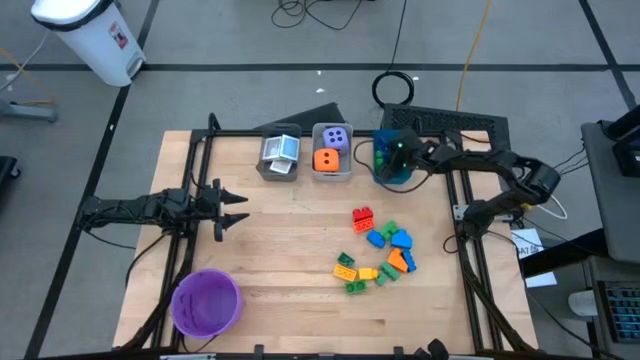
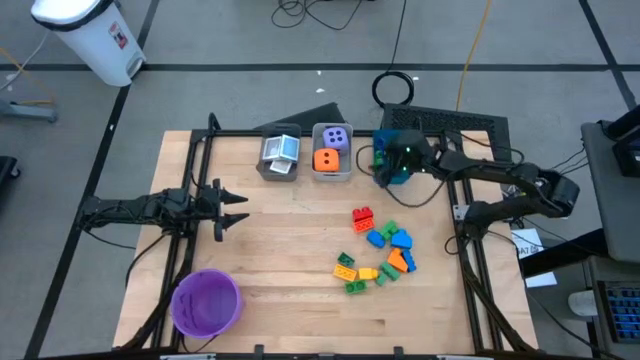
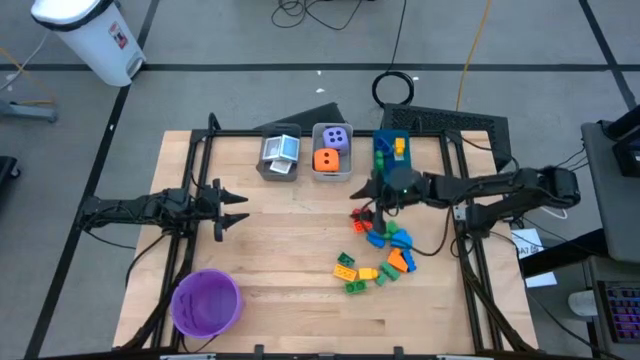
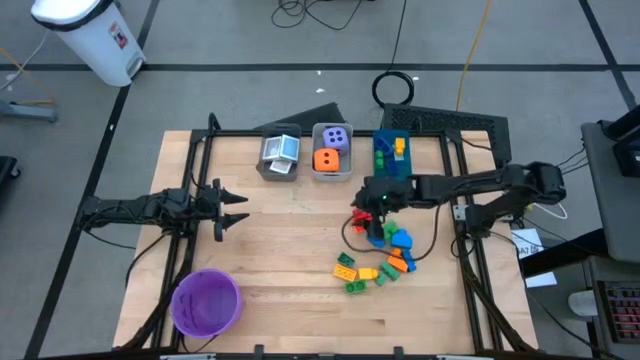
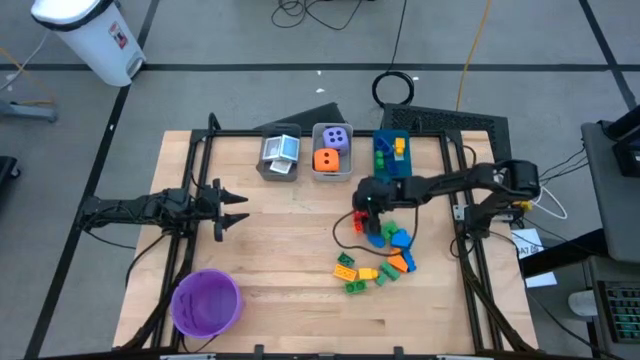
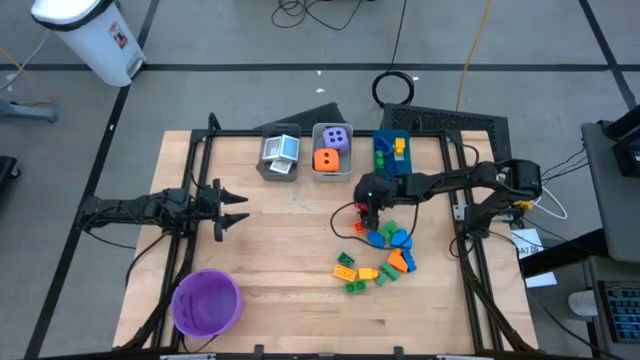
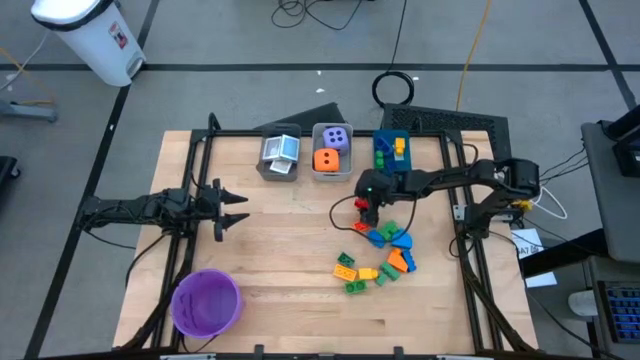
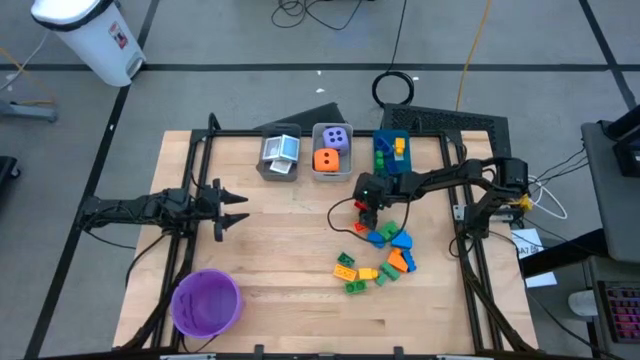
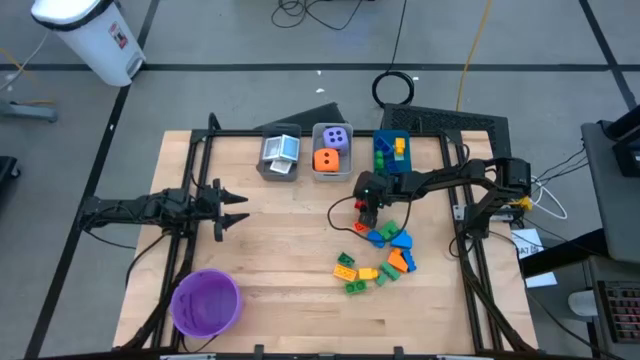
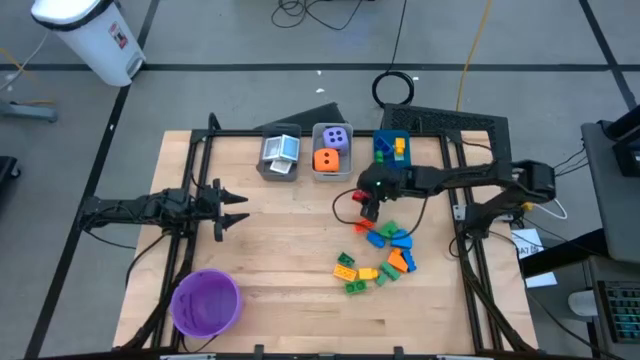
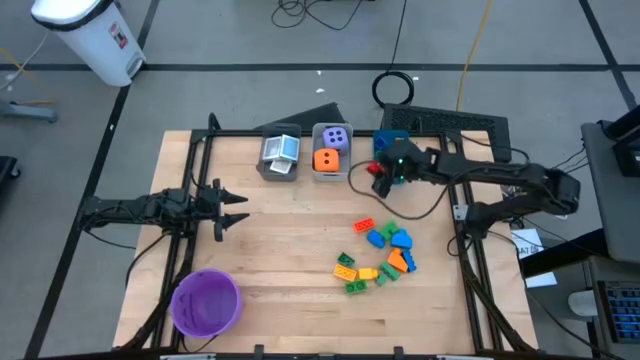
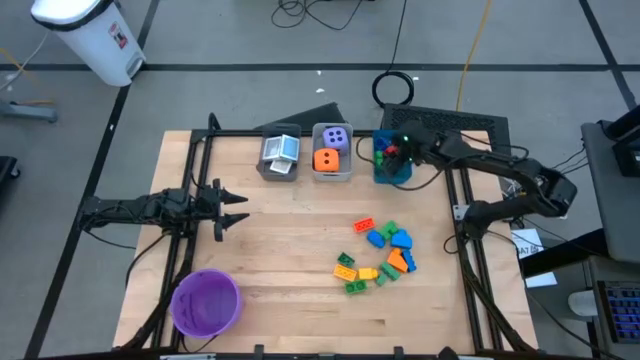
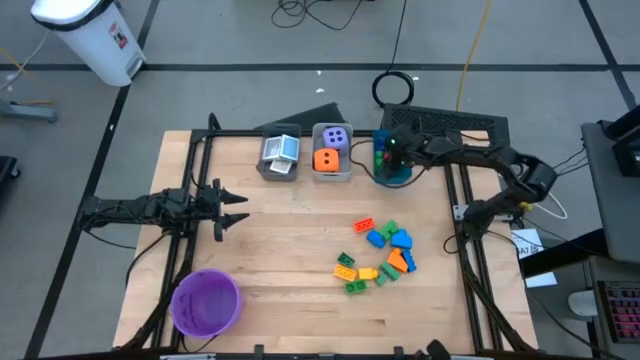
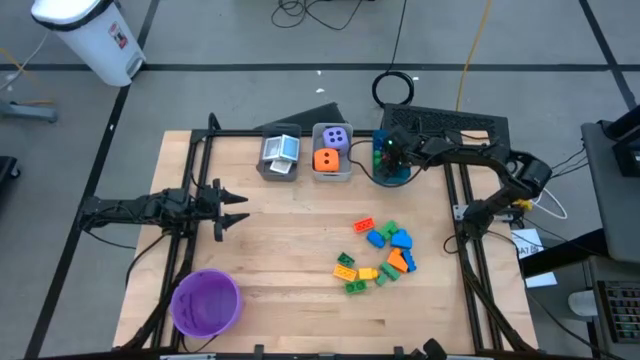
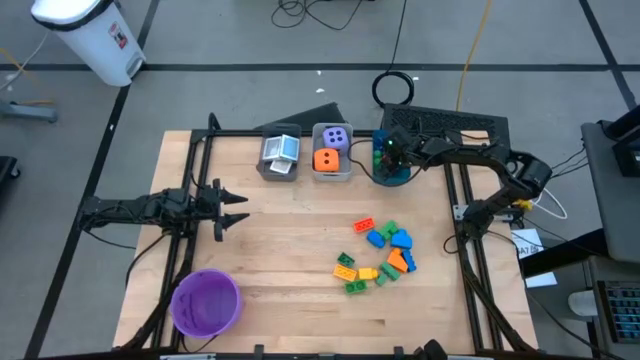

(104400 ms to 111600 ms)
Task: Pick & Place Toys
Put the red game piece into the blue bin

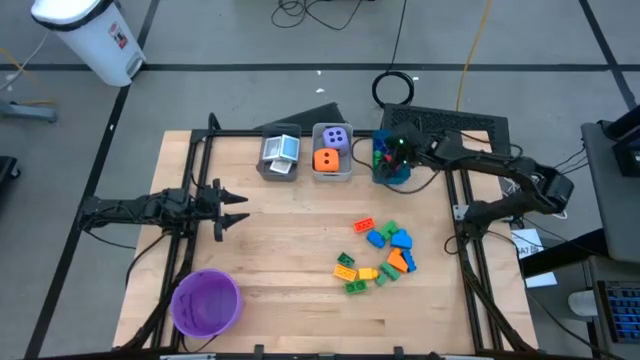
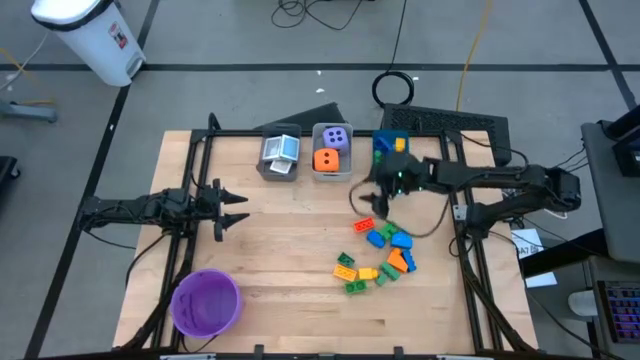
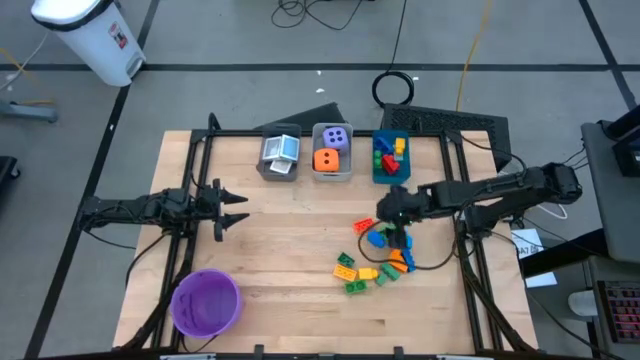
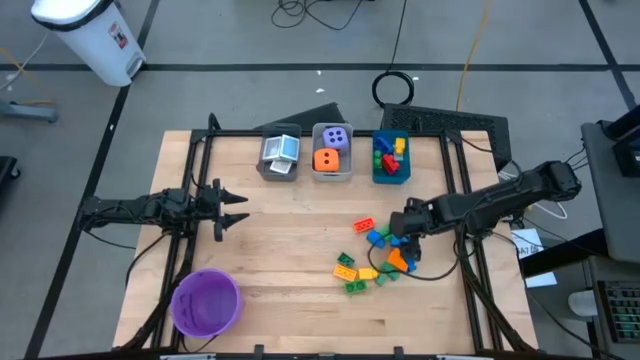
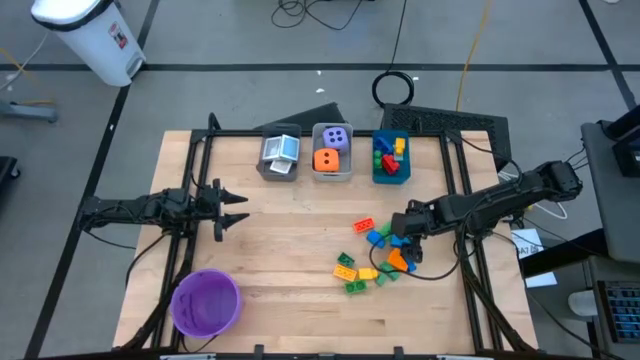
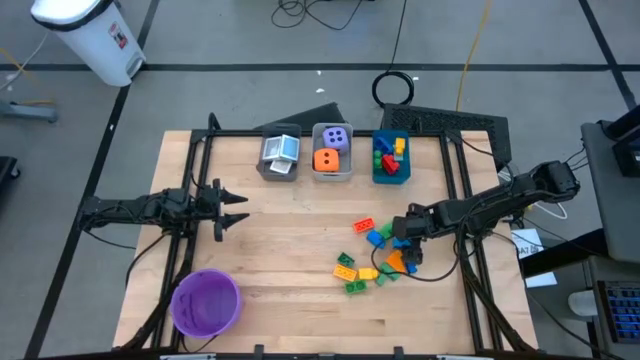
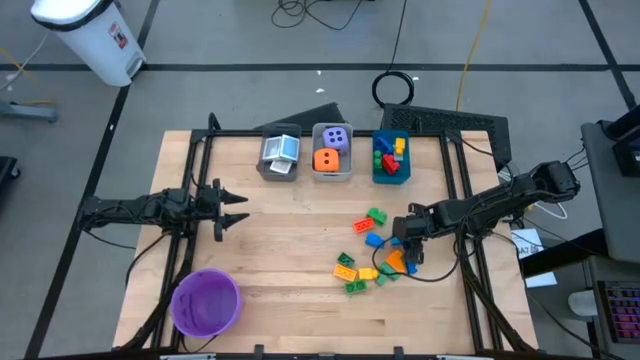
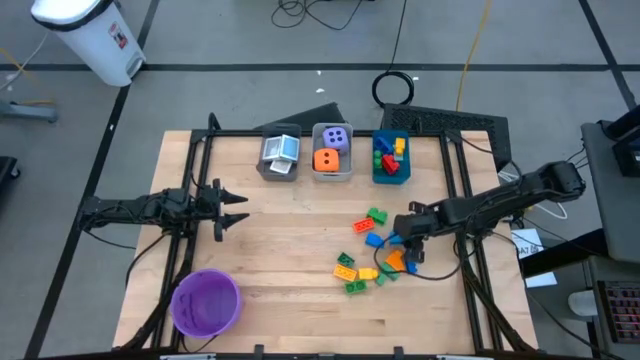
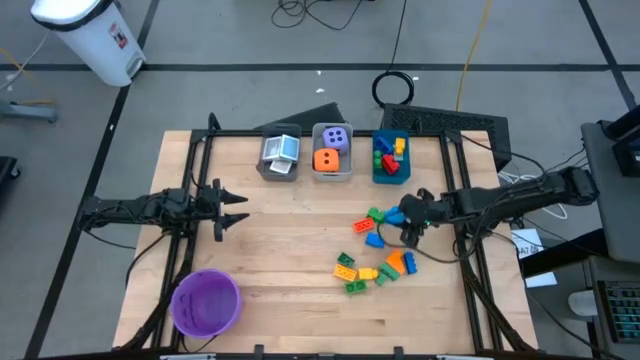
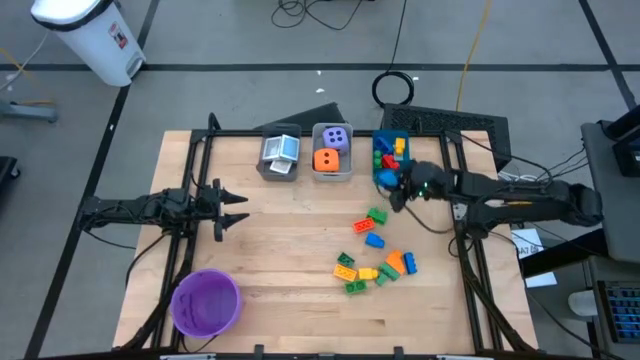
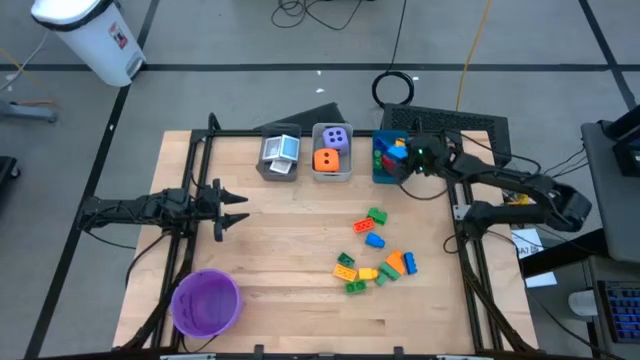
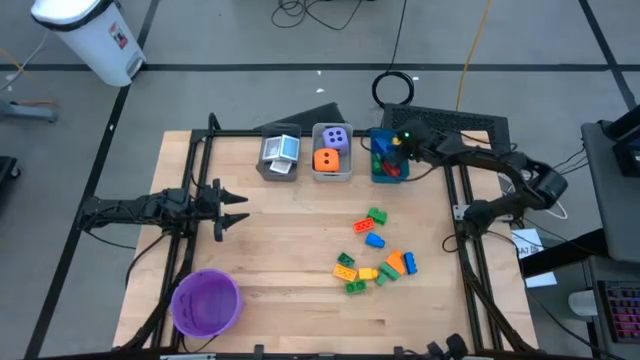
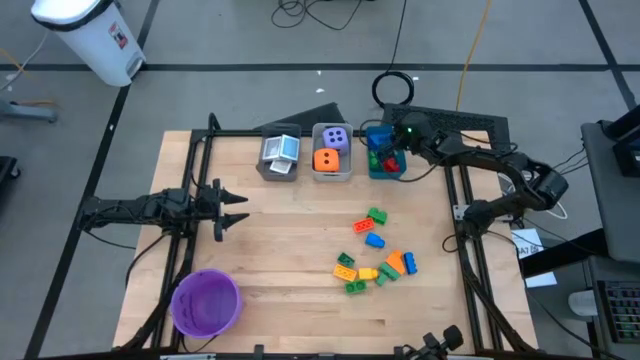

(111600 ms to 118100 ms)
Put the light blue game piece into the blue bin

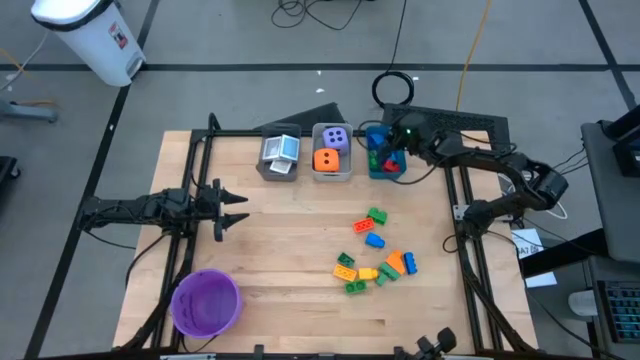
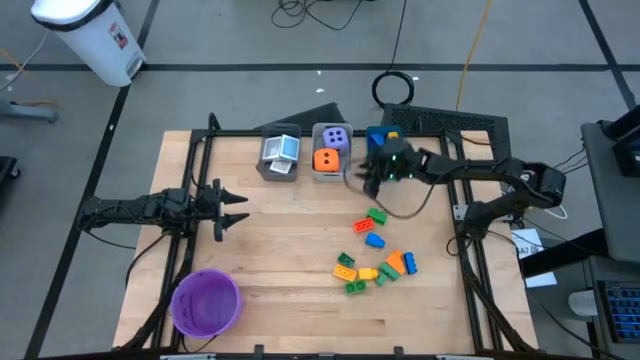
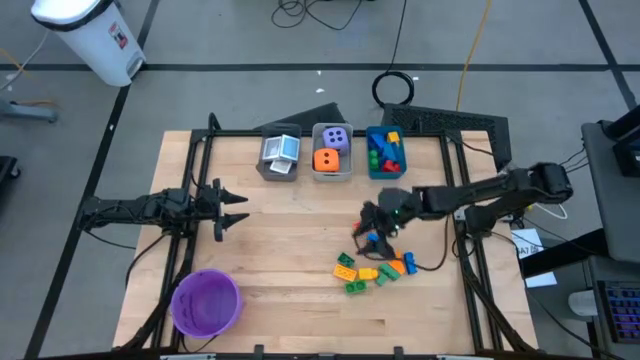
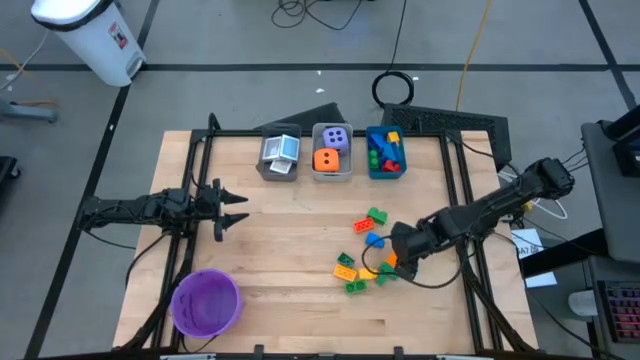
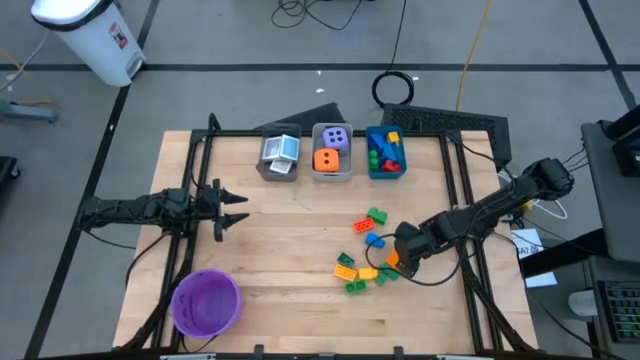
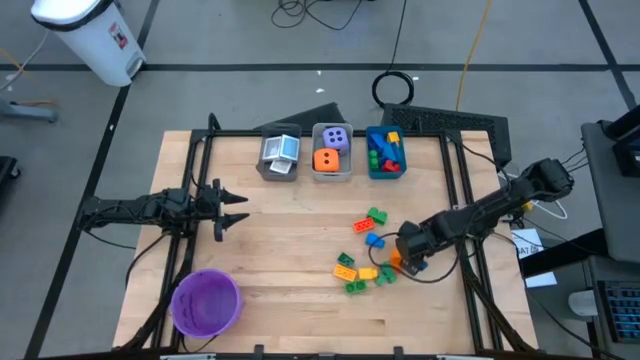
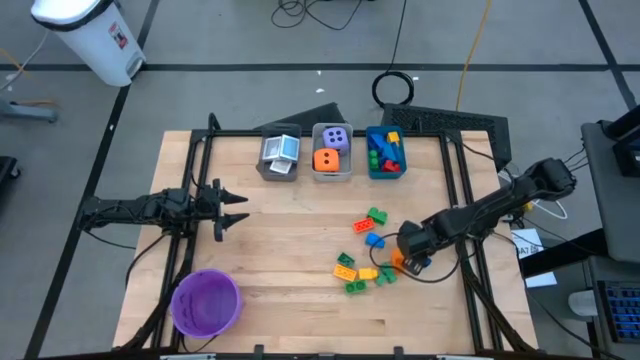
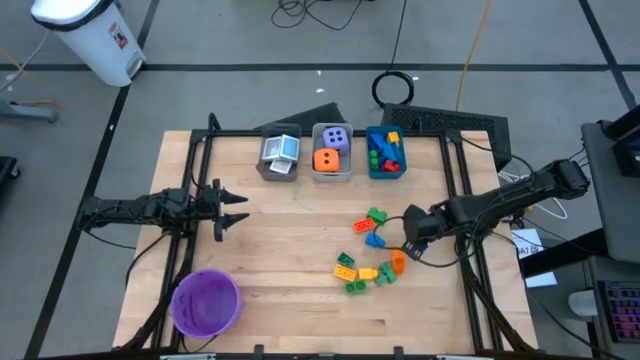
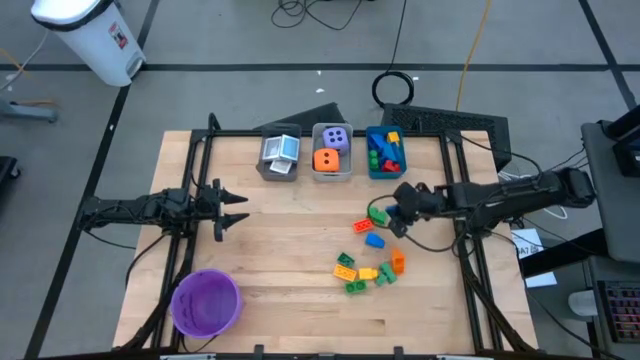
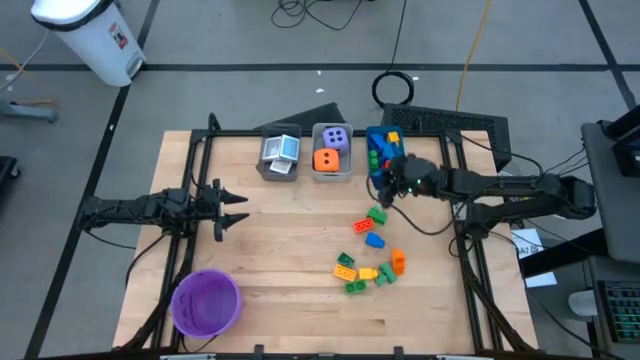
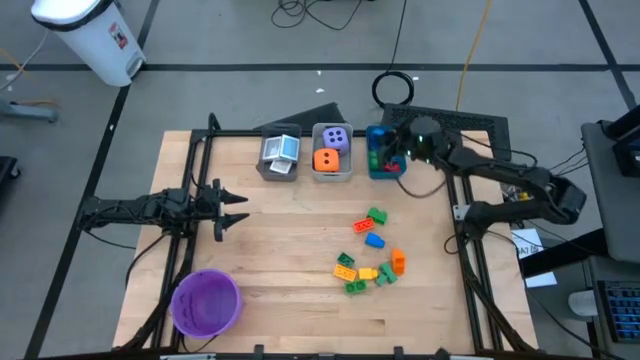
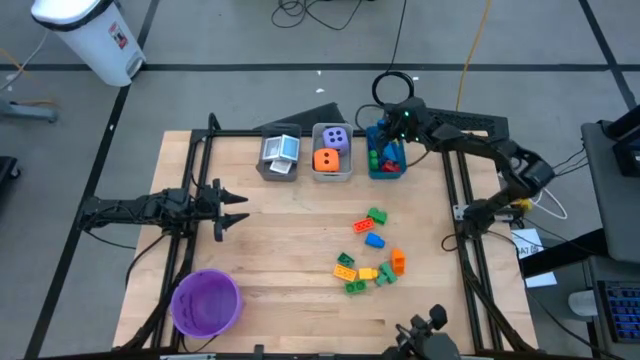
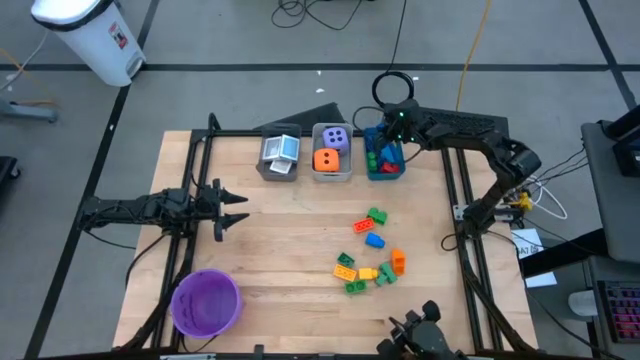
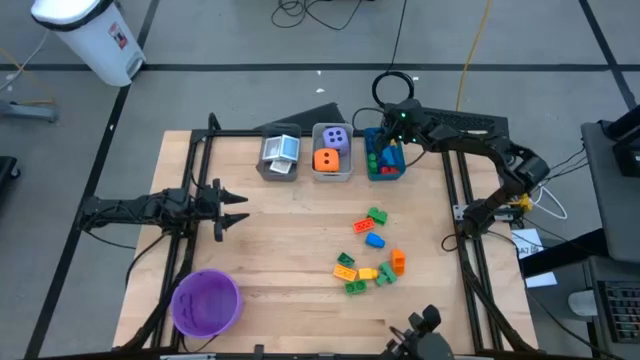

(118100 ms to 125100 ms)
Put the blue game piece into the blue bin
